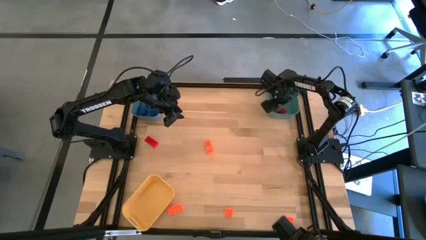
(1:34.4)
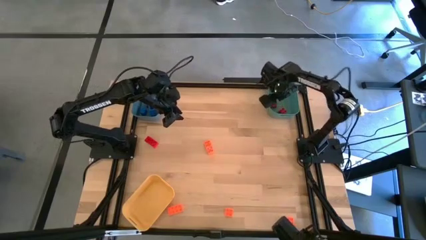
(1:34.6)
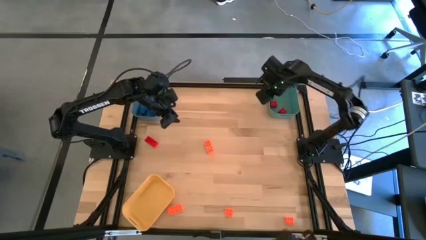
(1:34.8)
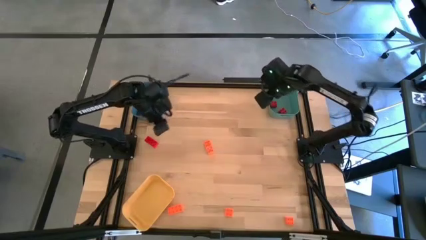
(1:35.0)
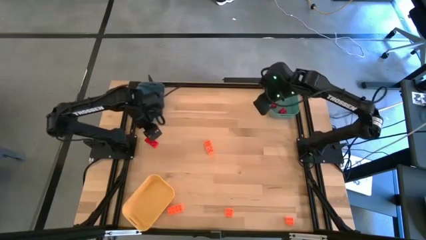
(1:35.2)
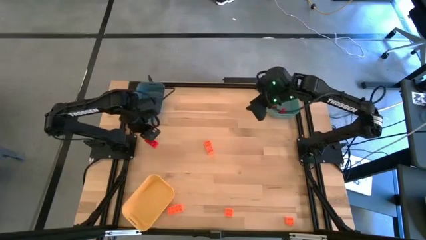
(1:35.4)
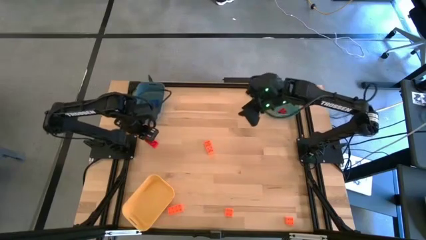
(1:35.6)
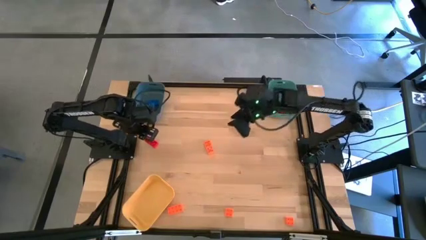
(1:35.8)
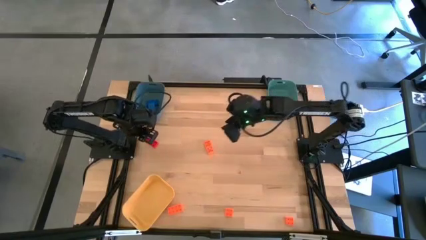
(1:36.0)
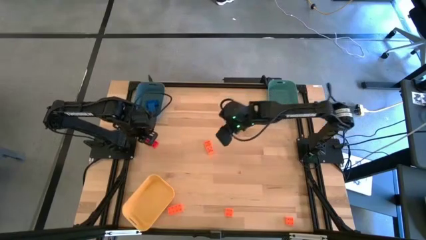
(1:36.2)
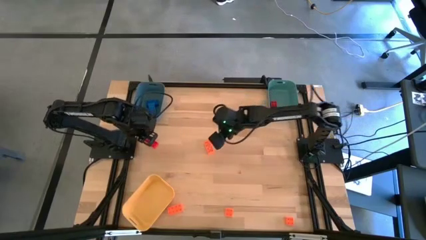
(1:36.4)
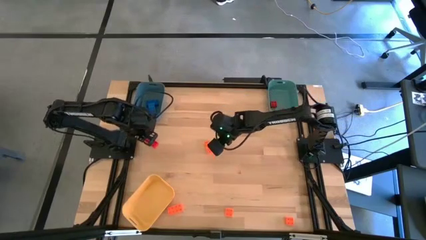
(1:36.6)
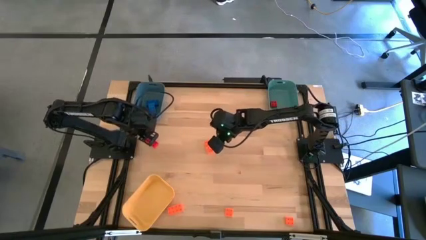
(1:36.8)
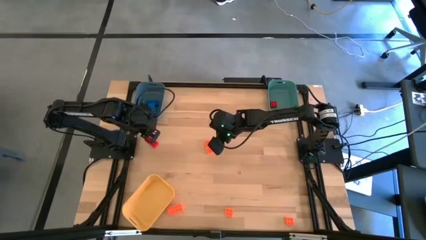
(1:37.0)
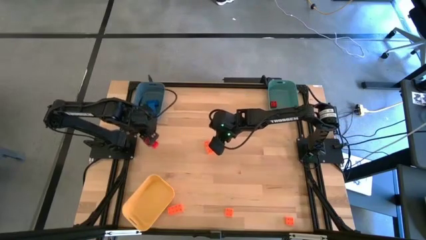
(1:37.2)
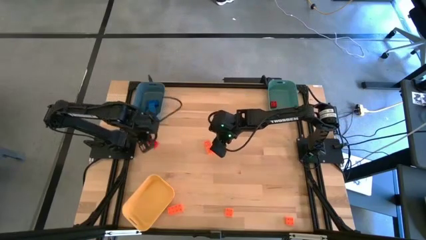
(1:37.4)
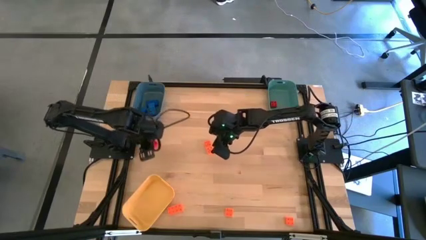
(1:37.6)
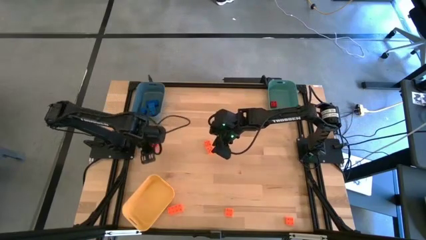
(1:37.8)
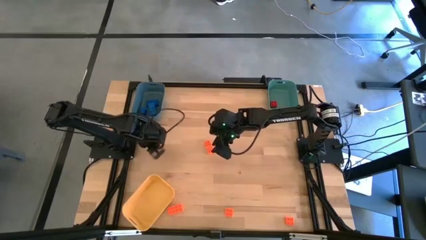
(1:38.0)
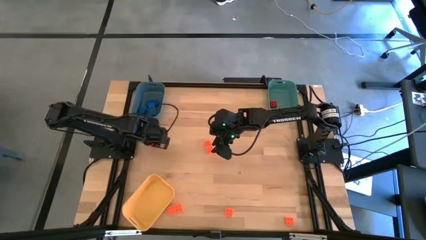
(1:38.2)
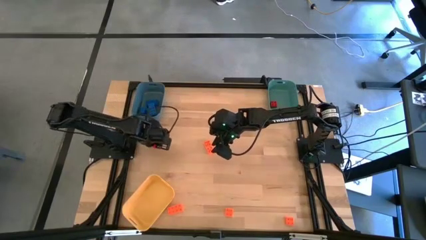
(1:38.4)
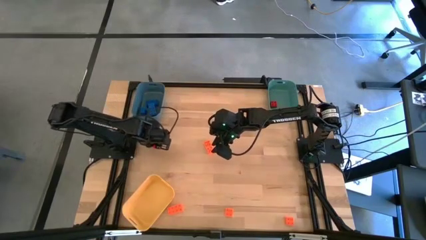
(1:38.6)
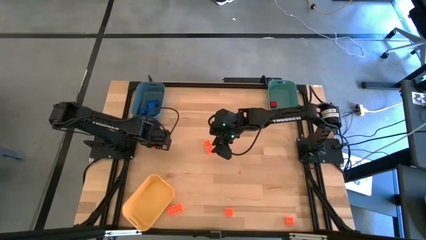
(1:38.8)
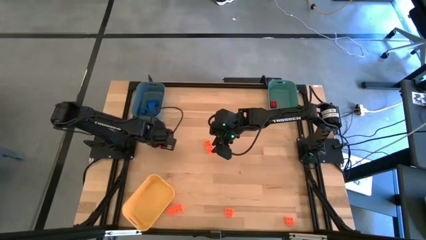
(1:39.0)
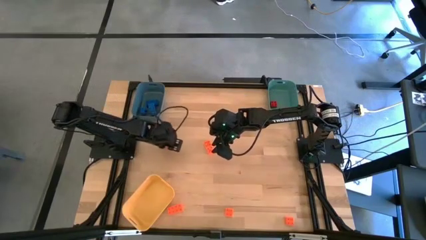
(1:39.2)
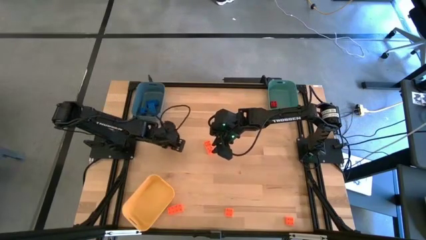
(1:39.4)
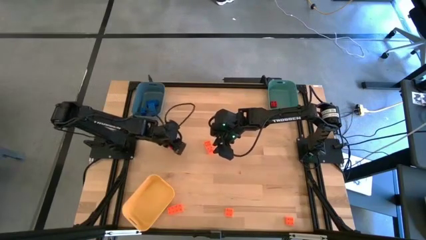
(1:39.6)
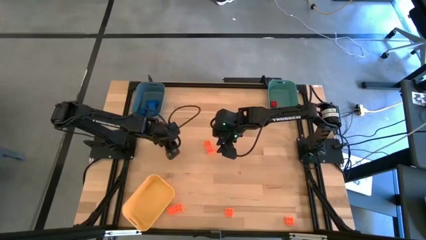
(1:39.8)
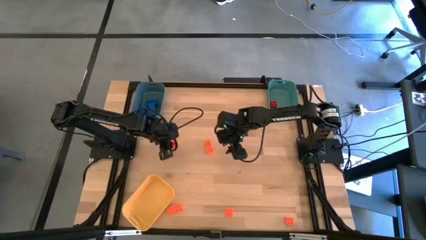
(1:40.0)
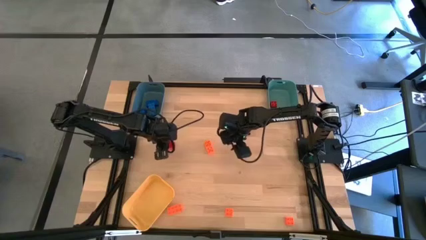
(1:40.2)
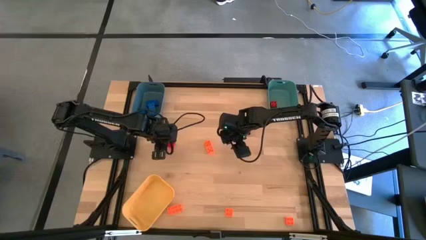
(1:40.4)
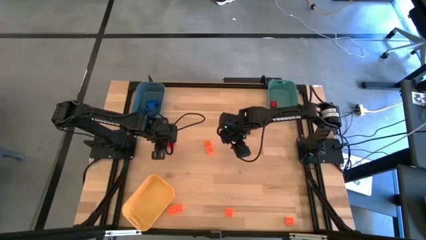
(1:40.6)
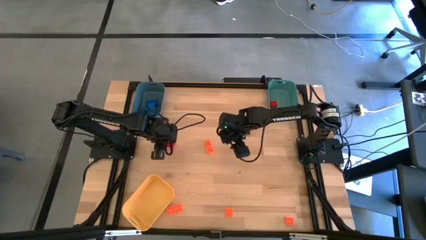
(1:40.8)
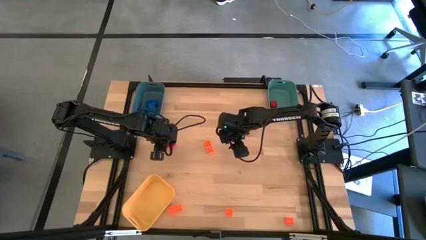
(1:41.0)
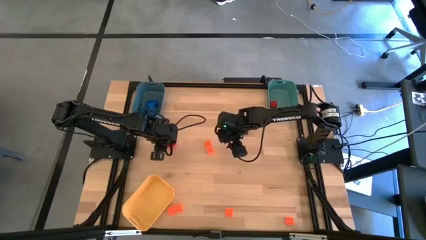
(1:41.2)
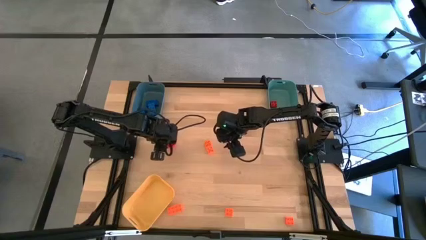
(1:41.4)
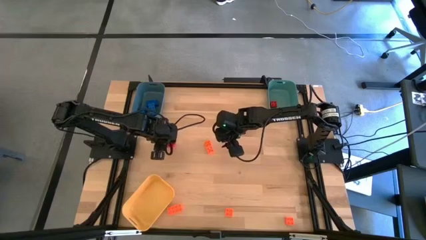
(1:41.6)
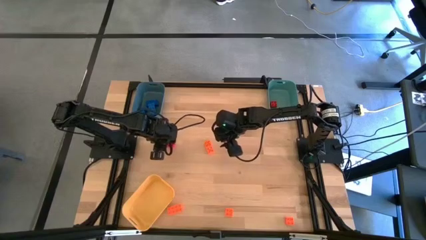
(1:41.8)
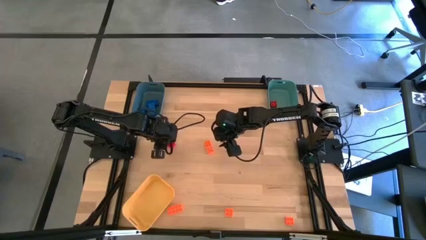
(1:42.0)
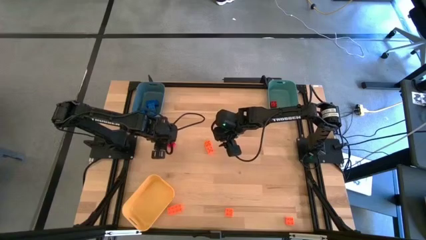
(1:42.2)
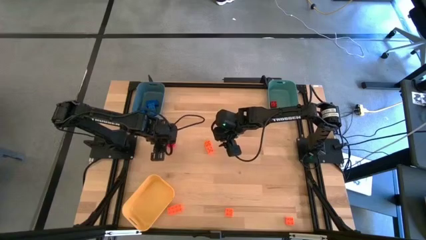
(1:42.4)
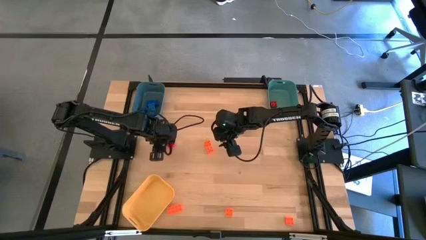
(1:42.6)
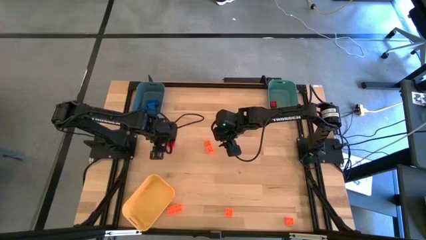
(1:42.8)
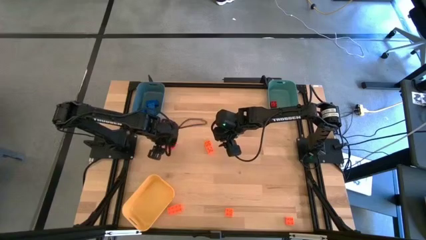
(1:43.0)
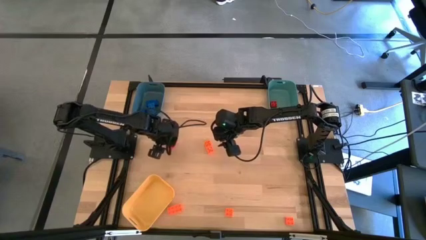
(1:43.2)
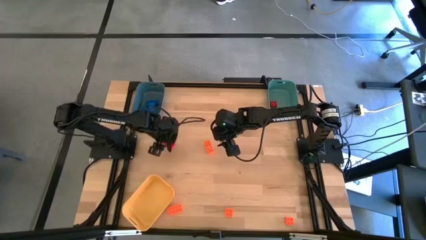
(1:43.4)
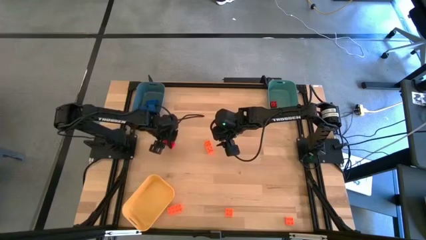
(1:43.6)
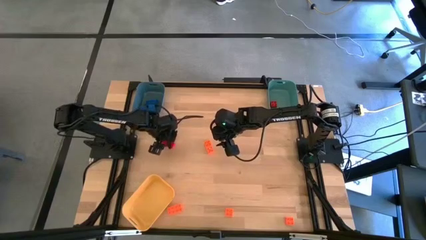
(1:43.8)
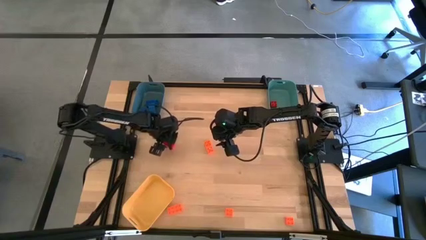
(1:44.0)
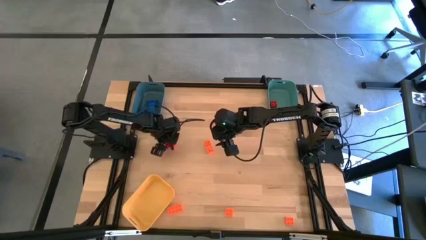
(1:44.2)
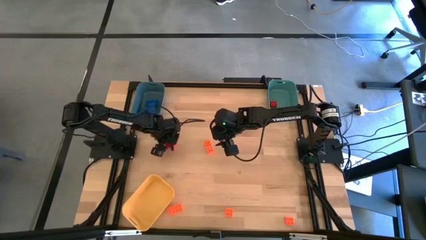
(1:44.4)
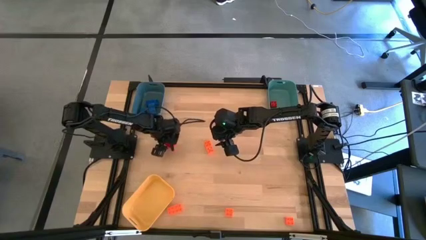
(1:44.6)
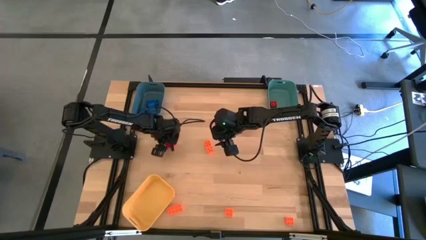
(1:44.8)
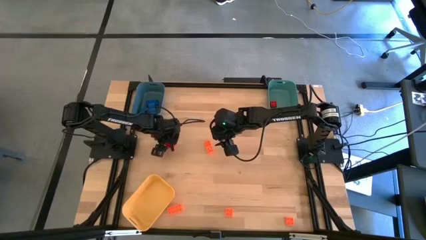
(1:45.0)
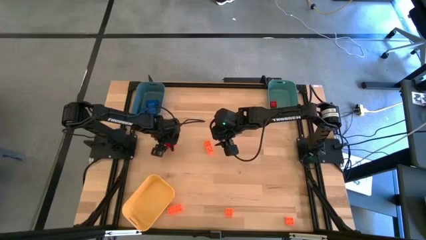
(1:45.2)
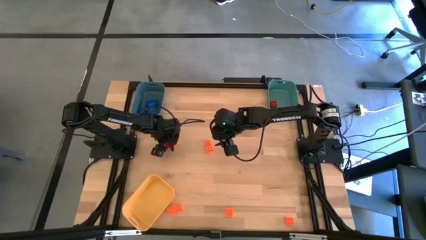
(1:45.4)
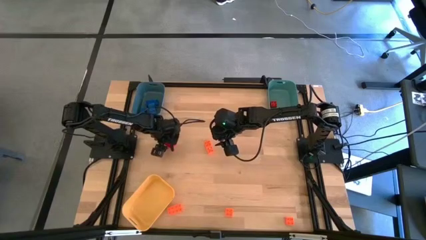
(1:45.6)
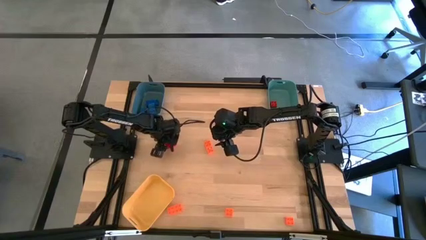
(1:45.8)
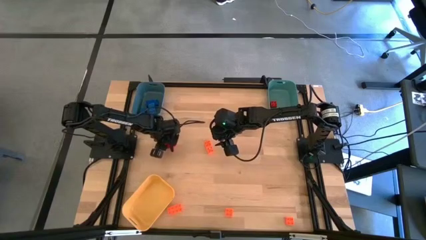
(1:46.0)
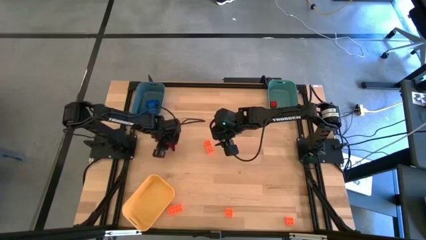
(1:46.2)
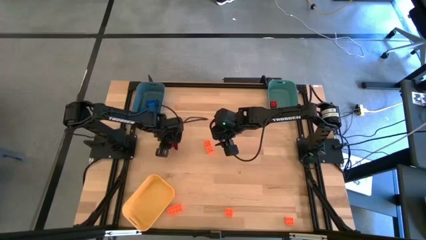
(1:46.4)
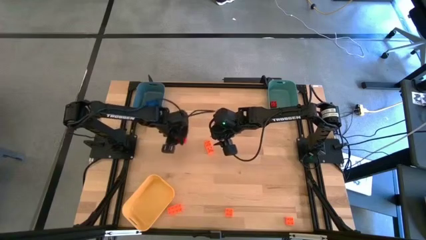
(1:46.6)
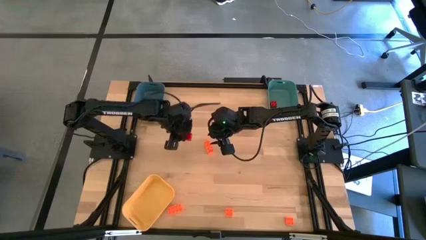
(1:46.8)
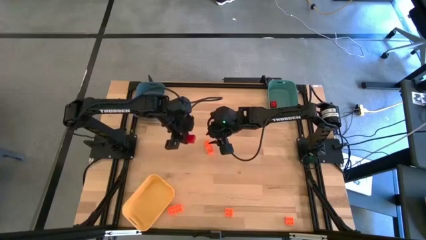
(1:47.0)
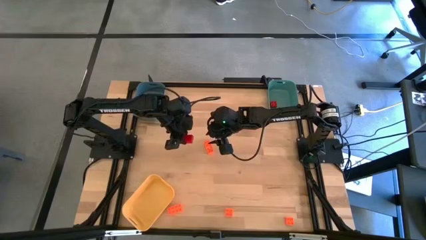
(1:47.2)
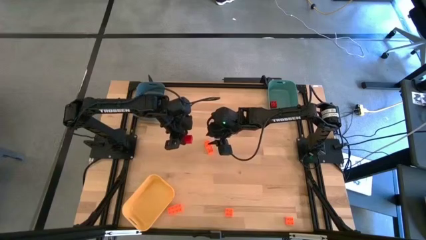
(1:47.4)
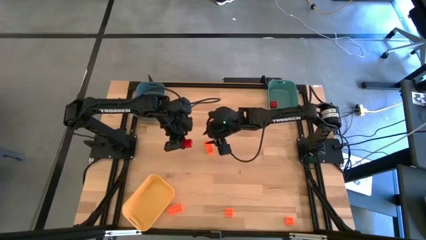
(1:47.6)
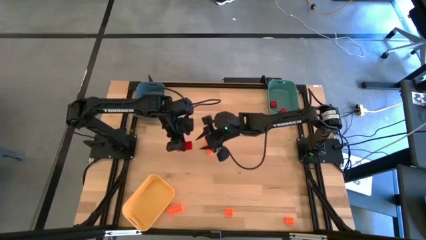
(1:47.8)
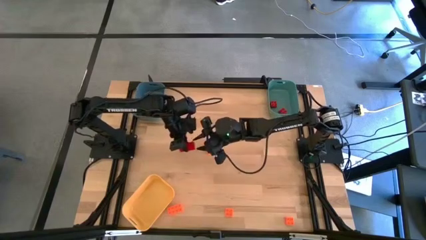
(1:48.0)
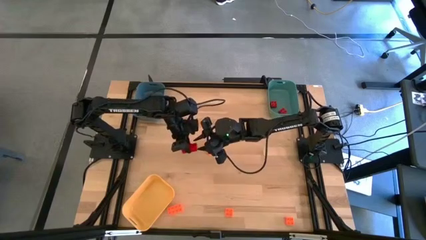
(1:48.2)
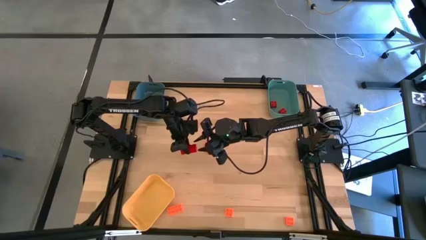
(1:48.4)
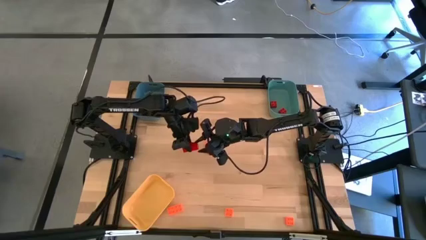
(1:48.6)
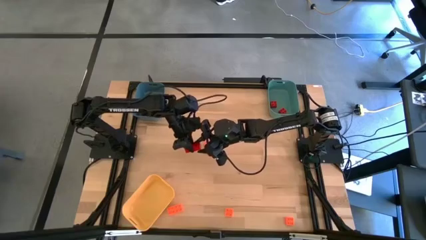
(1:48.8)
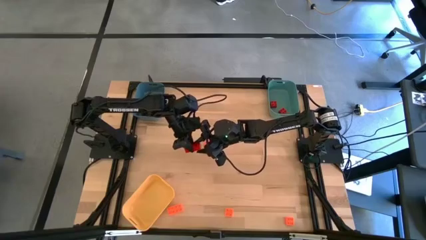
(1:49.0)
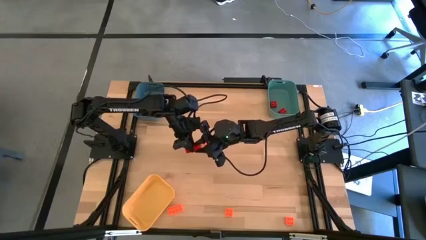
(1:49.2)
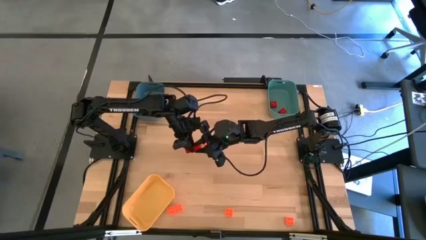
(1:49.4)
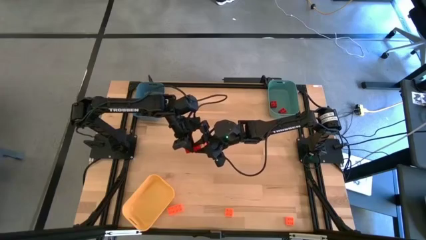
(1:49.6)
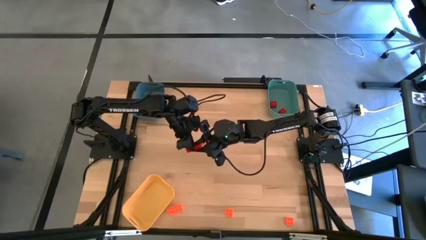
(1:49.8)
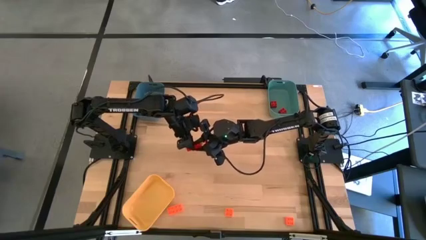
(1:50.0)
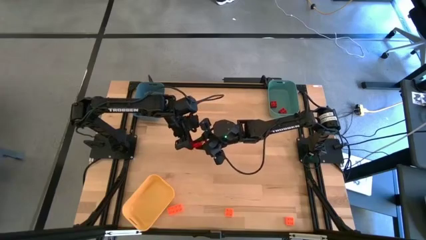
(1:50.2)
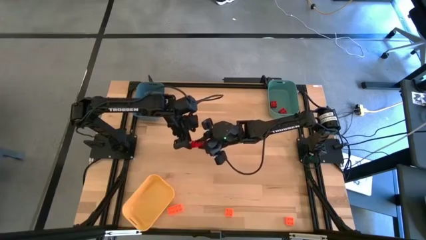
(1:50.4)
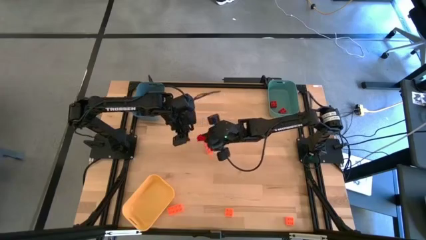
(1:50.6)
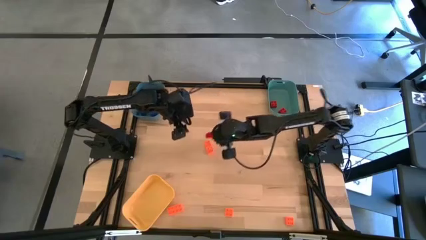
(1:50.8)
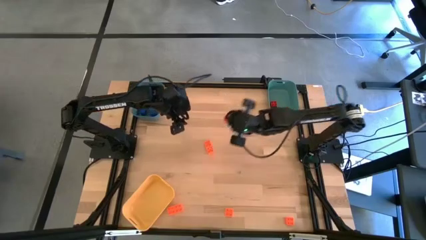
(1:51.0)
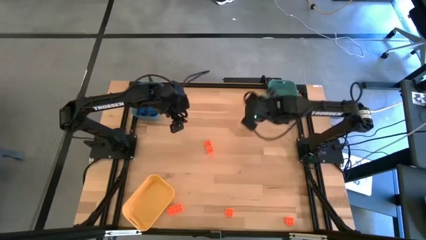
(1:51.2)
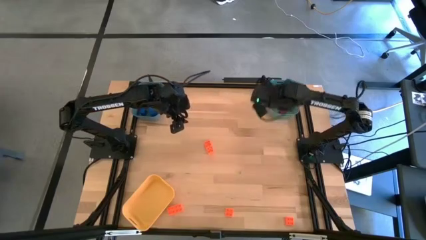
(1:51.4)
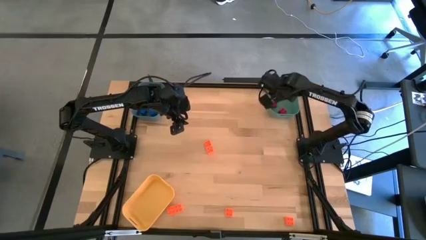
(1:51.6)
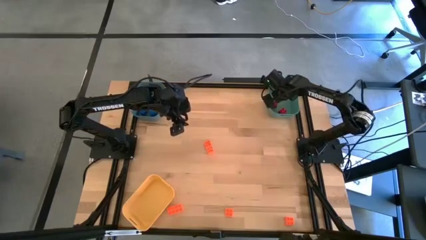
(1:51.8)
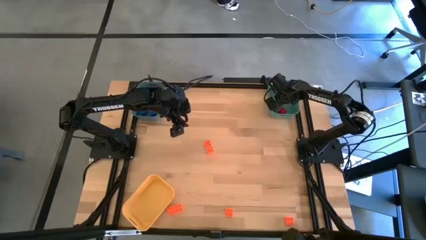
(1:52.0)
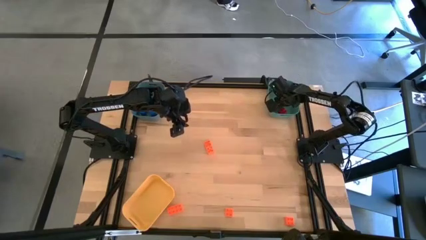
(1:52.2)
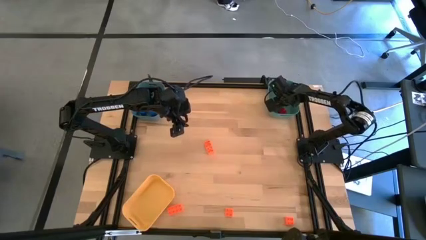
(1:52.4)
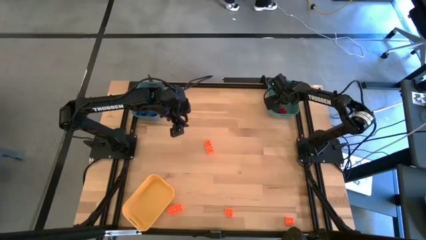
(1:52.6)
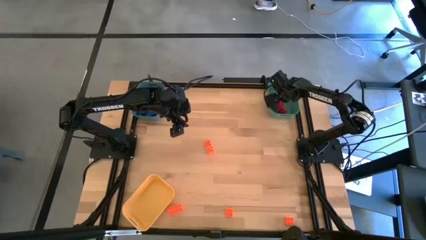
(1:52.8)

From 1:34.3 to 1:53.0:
Task: Sort & place blocks by color
Put the red game piece into the green bin
